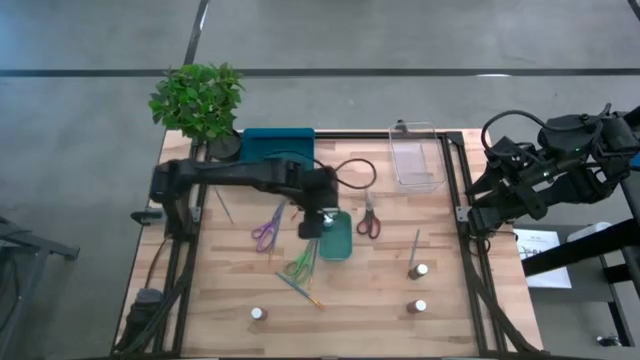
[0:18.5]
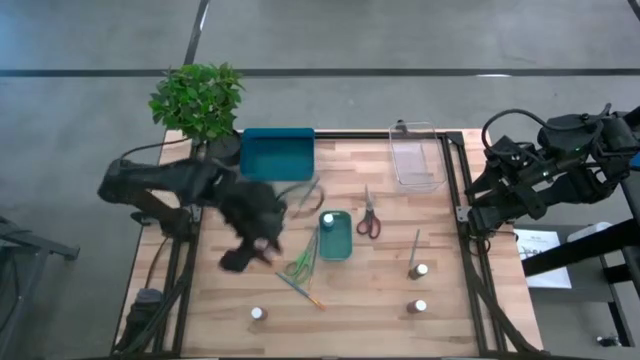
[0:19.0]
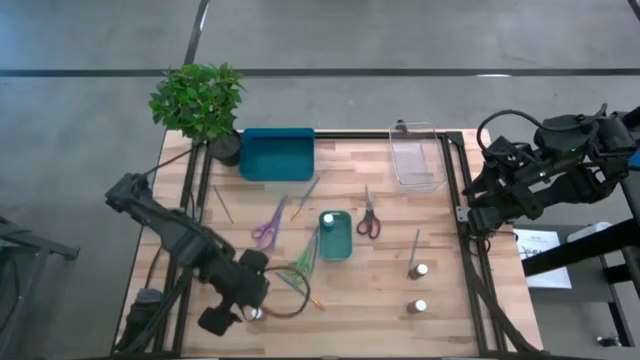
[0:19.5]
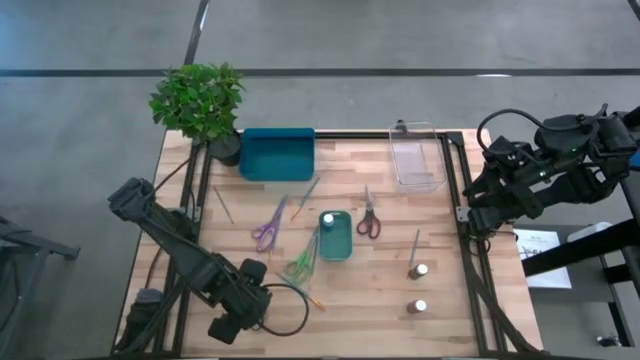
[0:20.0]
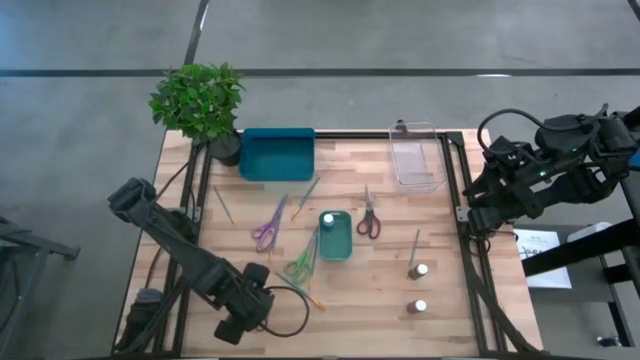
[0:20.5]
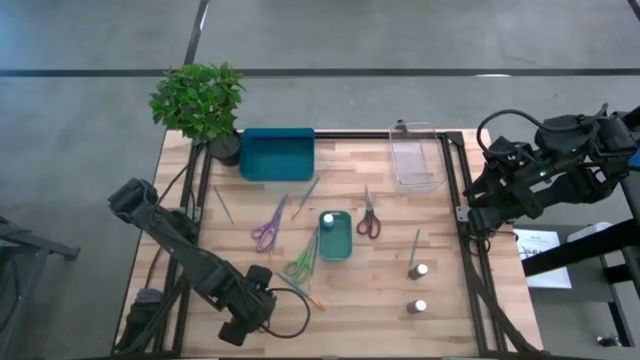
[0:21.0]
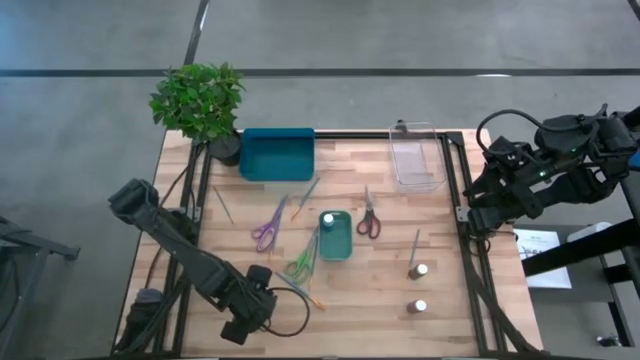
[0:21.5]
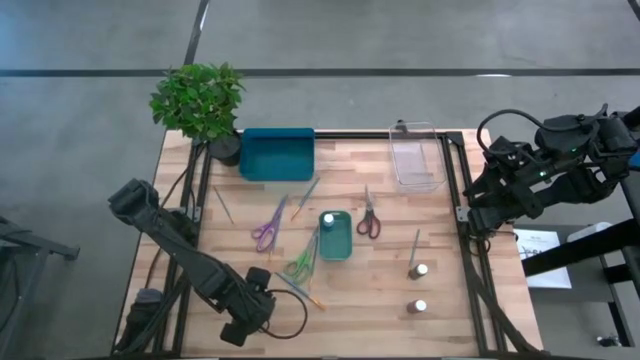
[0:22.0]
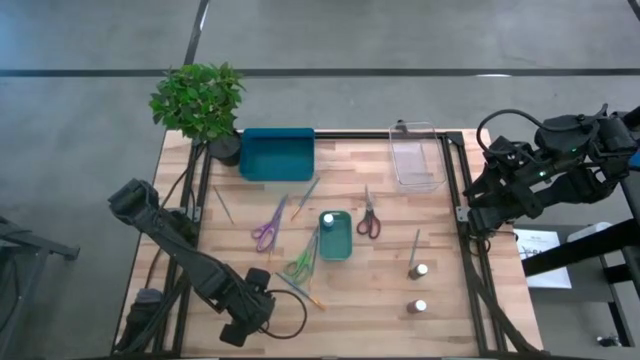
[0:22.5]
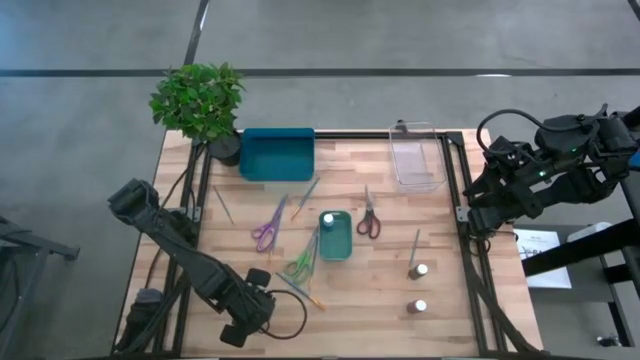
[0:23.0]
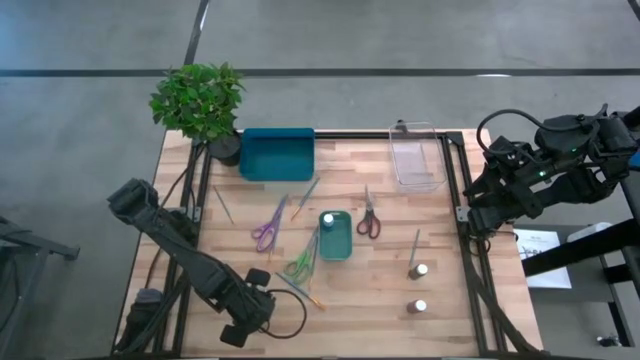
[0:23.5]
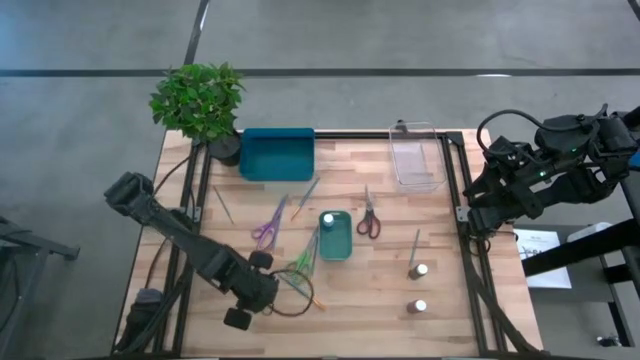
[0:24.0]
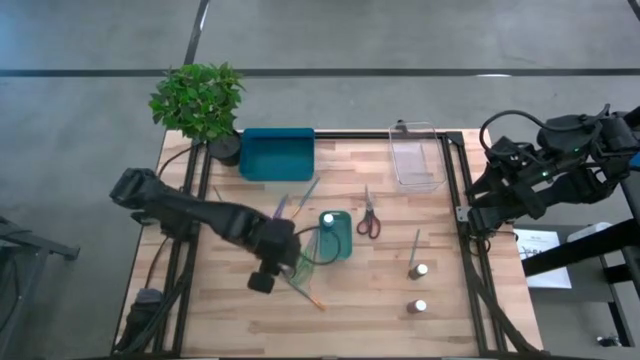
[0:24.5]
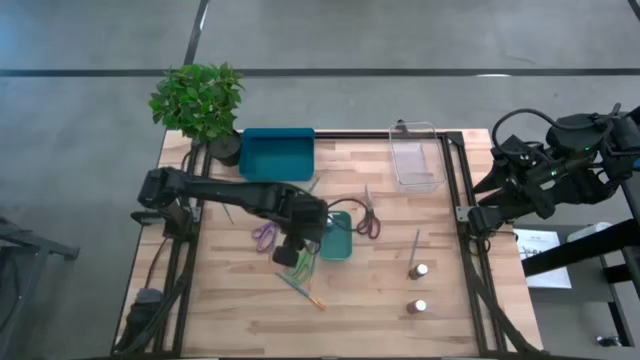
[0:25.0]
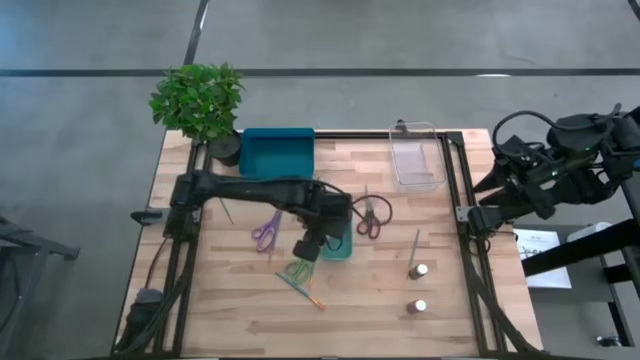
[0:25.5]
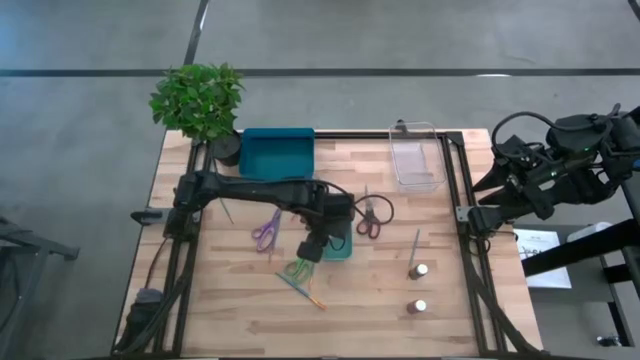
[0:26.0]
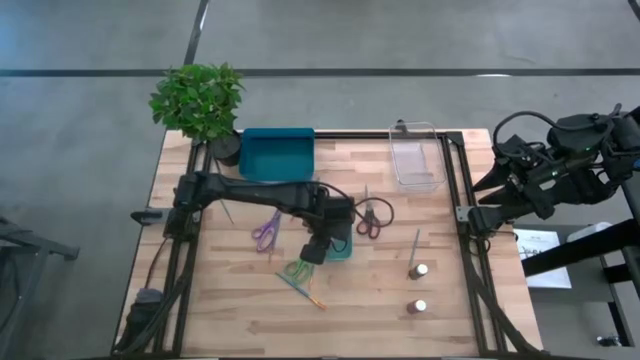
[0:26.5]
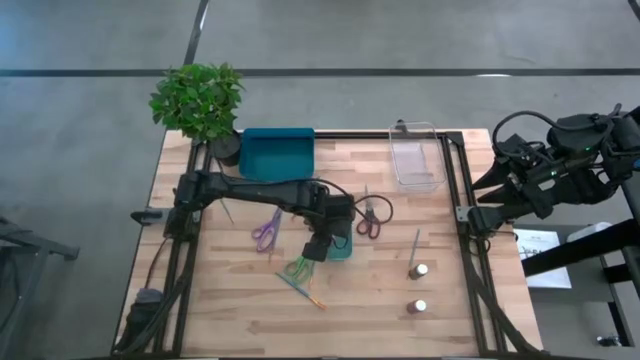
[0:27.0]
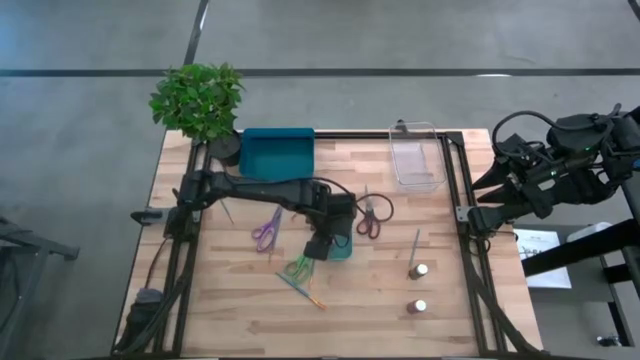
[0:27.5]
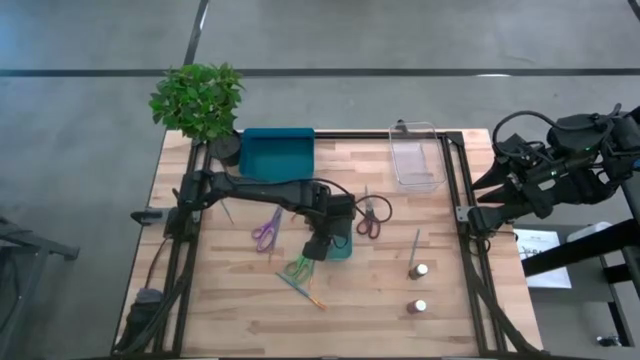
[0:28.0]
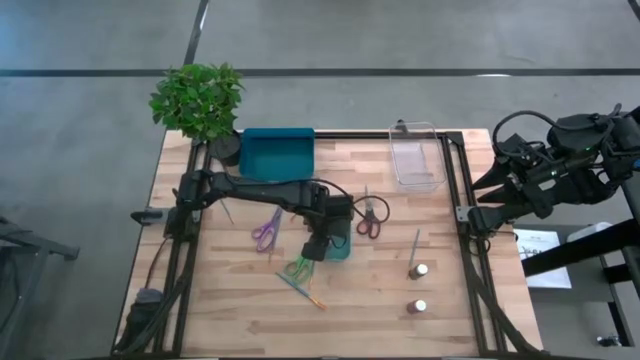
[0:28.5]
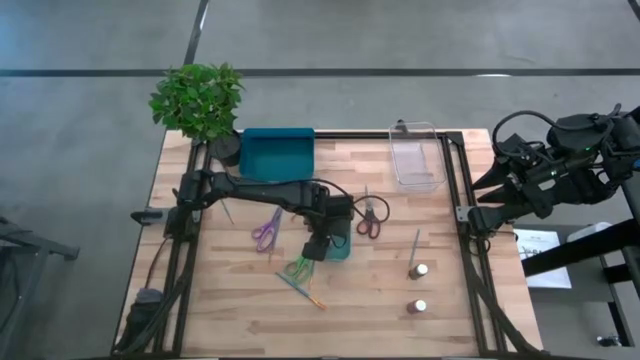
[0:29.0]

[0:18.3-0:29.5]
Task: Pick & Place Paint Supplies
Put the brown paint bottle into the blue bin

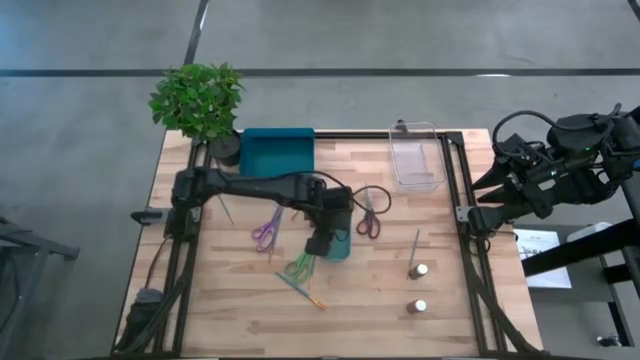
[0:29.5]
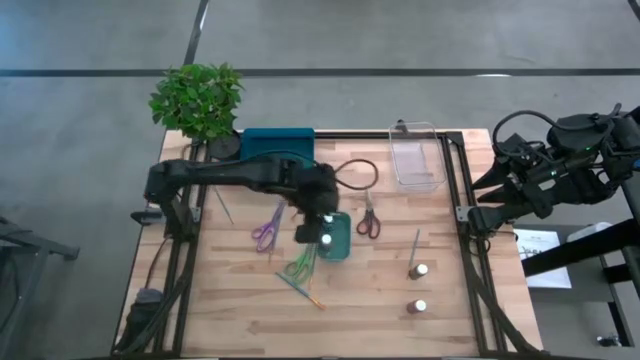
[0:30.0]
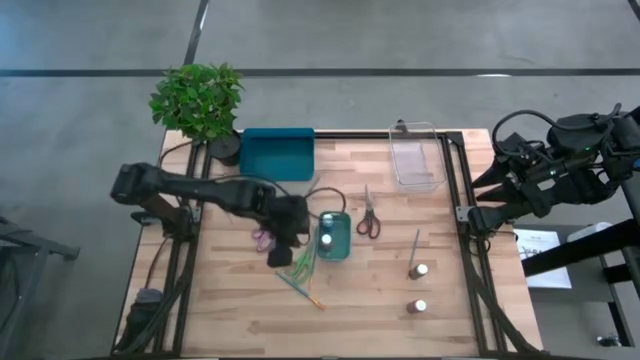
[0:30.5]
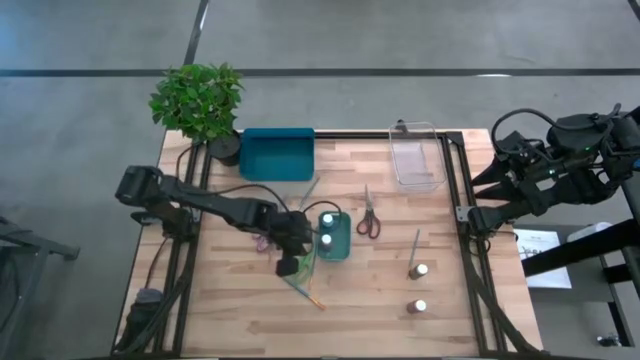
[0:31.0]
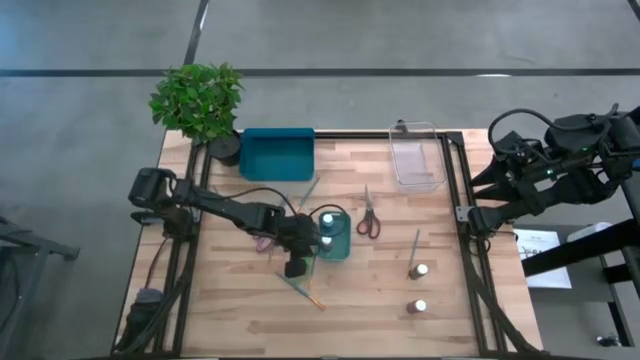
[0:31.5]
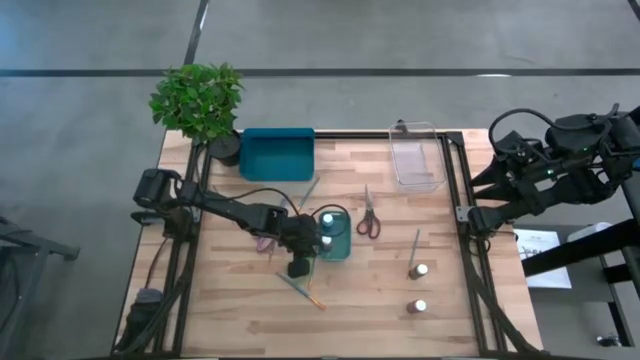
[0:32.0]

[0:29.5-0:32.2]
Adjust the blue bin
